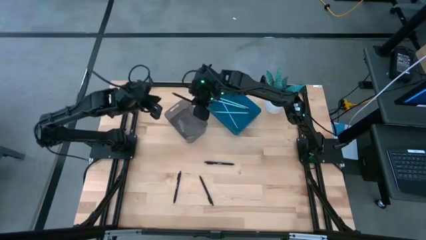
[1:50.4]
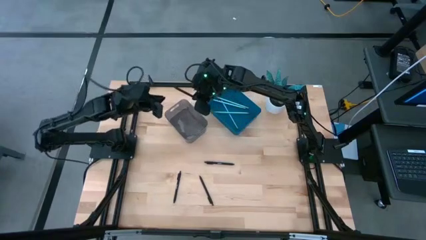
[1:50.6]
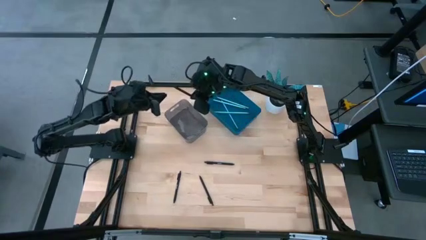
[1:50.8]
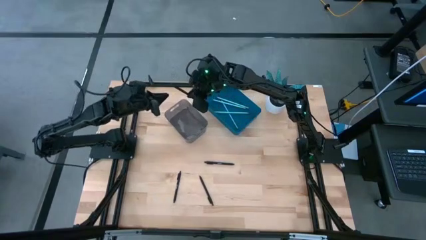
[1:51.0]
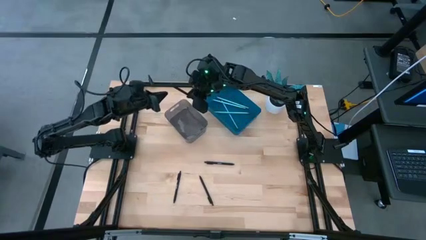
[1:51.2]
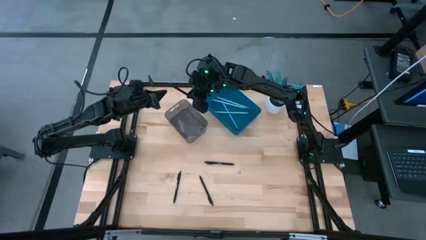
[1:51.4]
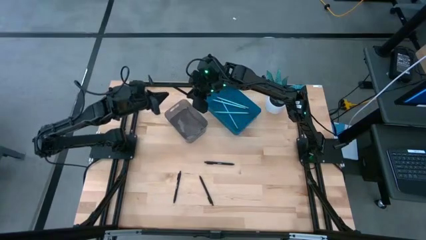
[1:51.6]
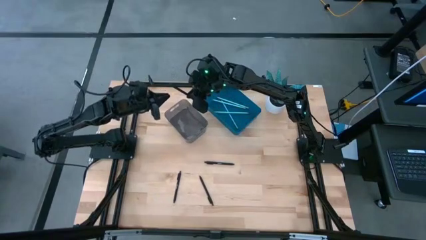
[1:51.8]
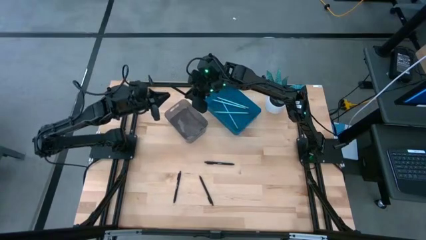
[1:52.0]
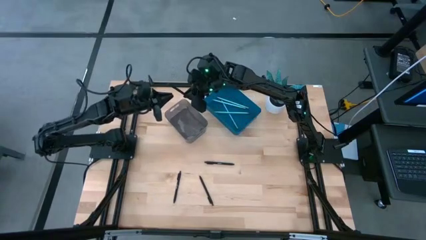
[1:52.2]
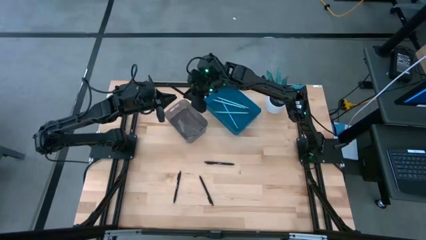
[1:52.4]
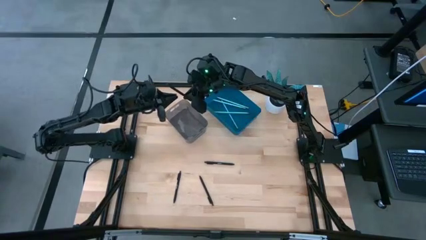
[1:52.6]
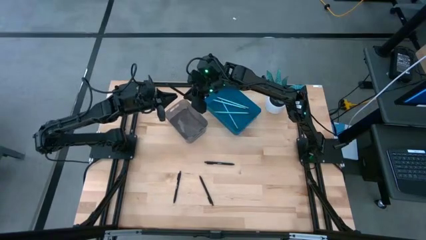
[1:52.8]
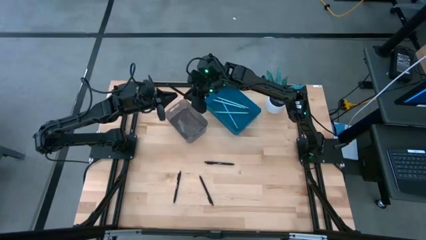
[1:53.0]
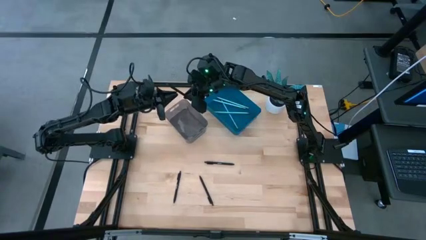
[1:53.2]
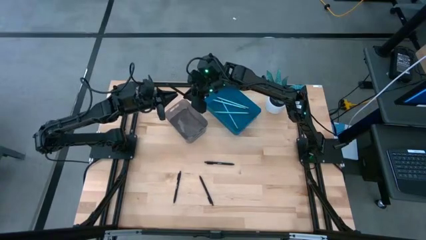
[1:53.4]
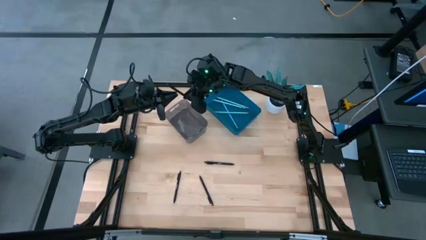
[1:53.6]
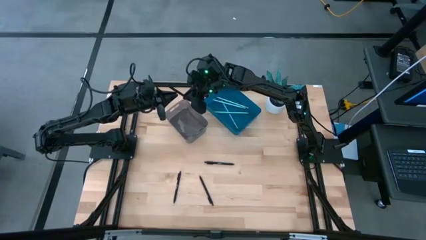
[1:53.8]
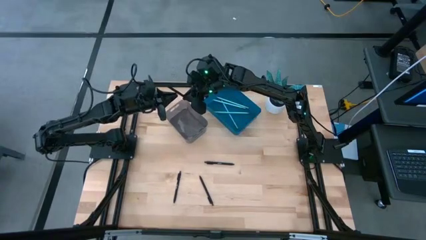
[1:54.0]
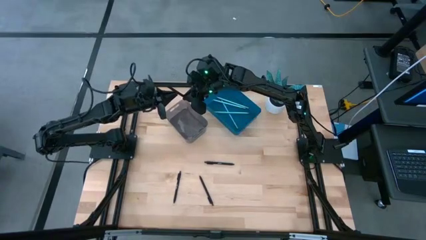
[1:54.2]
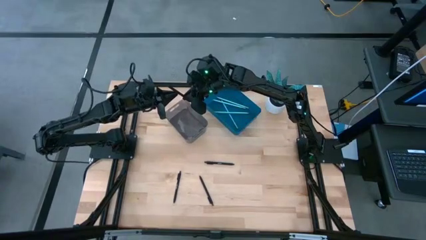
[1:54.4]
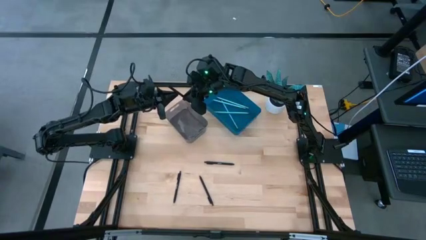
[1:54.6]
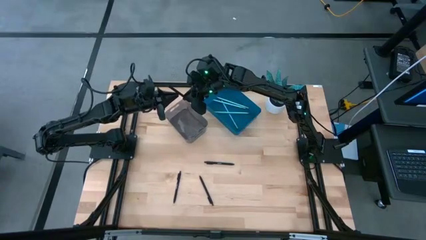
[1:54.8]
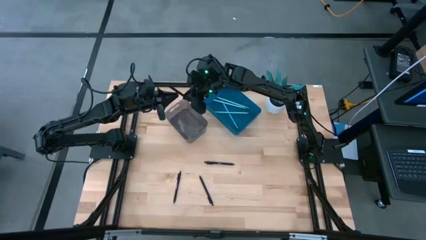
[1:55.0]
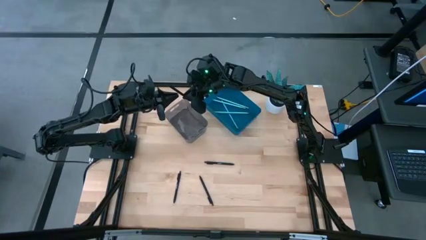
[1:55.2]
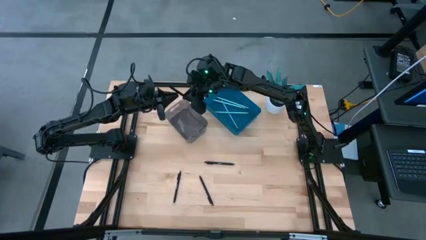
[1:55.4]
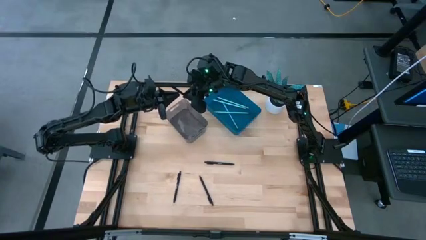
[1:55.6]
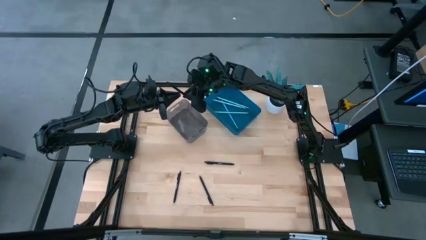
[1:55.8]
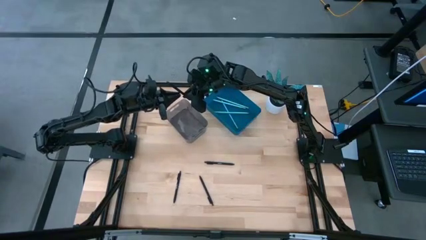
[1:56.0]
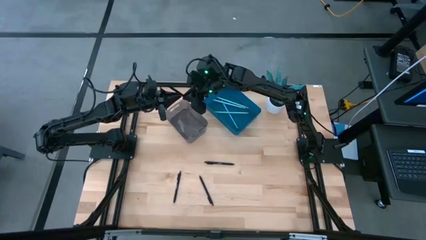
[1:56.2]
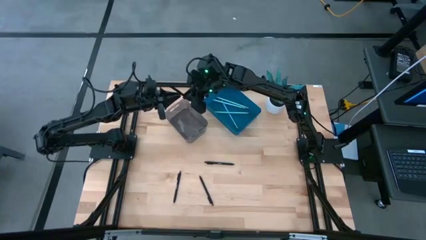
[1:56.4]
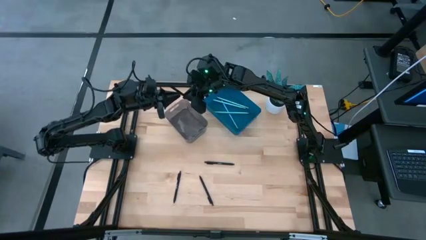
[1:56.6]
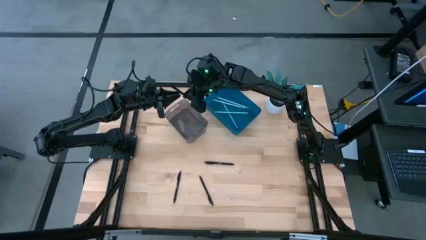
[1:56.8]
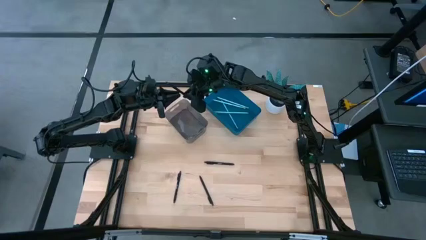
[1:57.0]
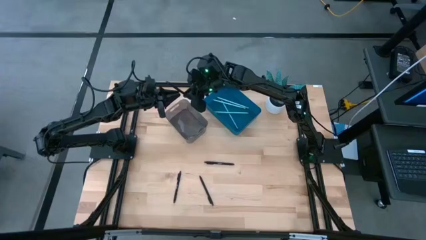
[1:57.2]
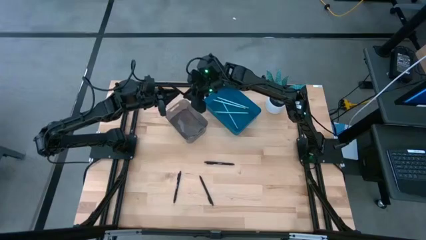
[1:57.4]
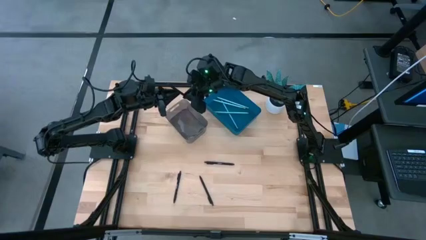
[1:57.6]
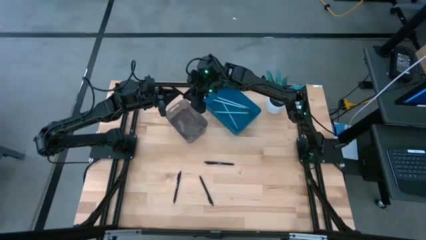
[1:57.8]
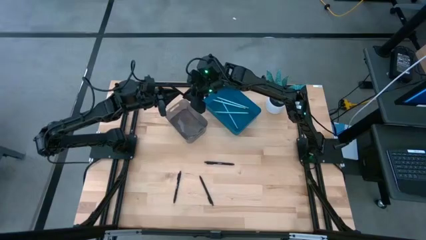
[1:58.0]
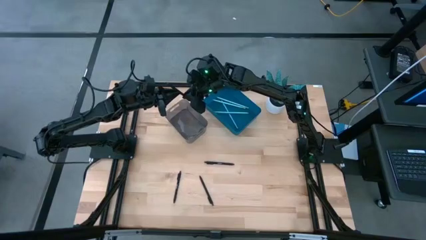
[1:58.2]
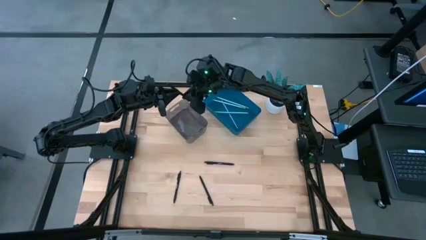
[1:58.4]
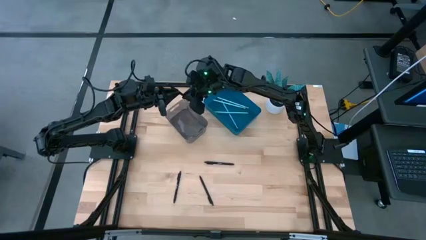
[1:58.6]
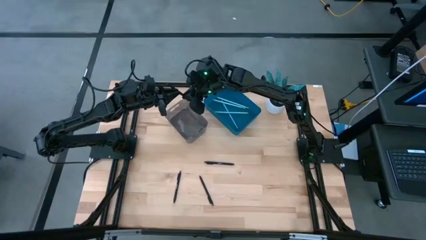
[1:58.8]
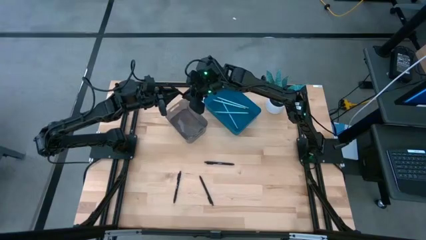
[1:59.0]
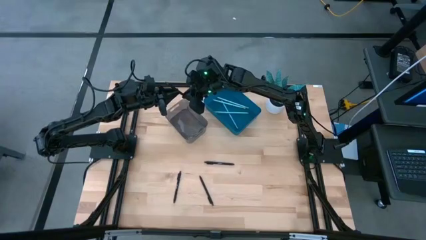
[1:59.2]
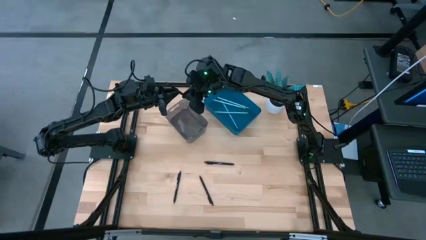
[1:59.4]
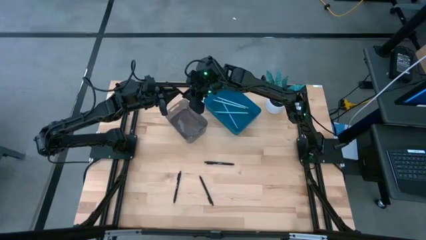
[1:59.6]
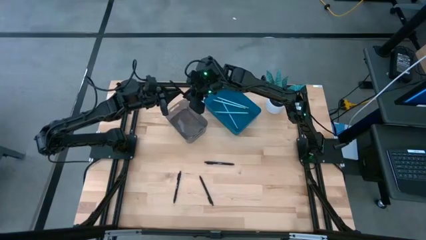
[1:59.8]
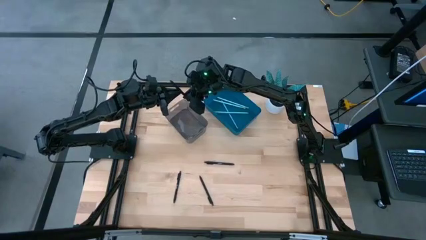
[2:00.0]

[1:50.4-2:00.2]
Task: Sort pens & pencils
Put the black pen into the black bin

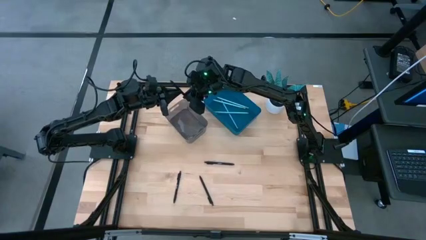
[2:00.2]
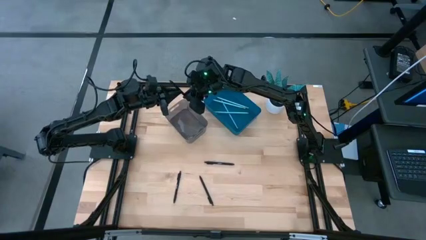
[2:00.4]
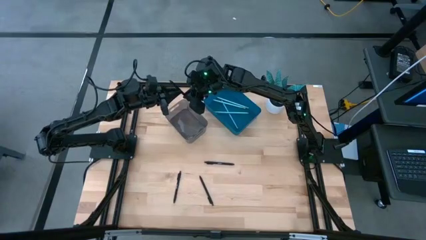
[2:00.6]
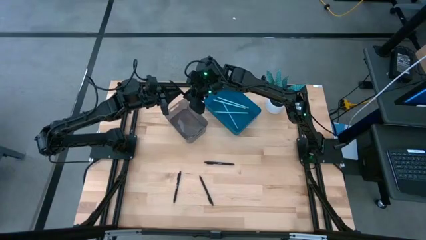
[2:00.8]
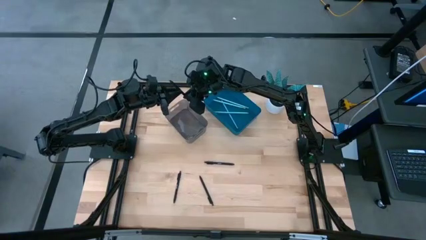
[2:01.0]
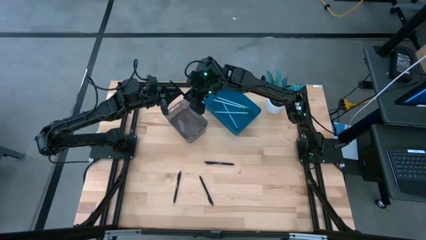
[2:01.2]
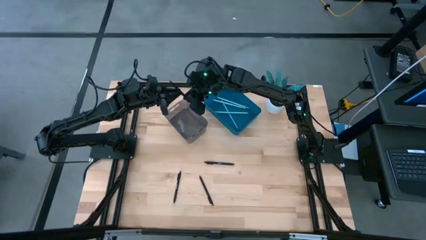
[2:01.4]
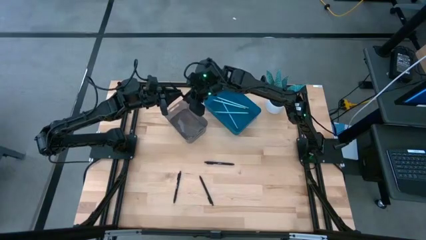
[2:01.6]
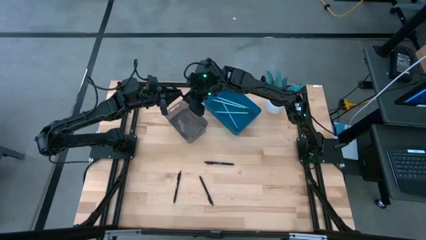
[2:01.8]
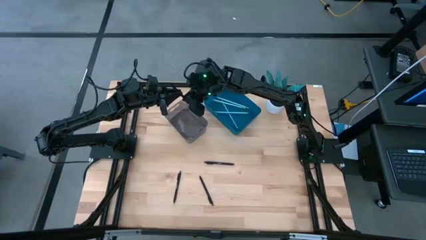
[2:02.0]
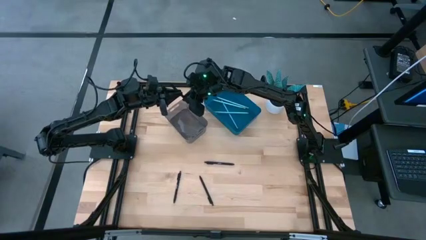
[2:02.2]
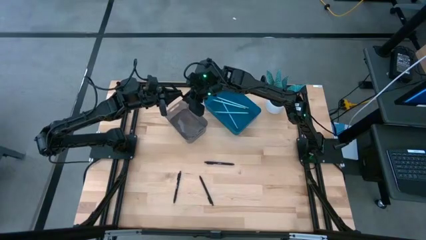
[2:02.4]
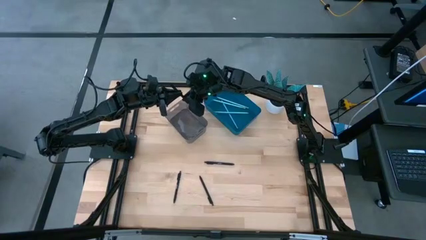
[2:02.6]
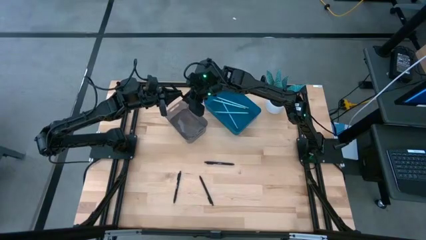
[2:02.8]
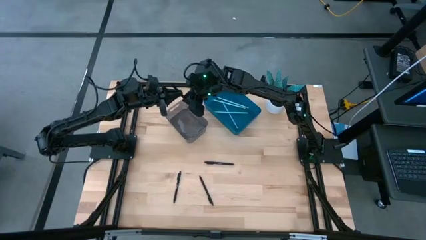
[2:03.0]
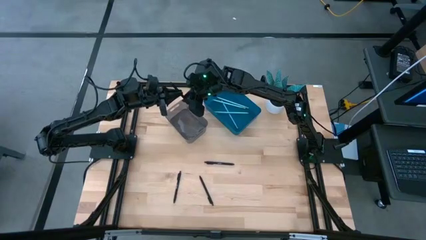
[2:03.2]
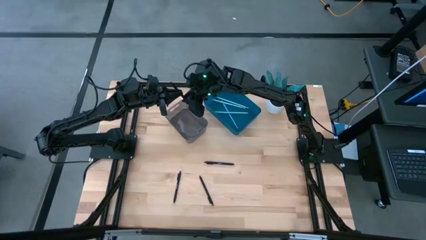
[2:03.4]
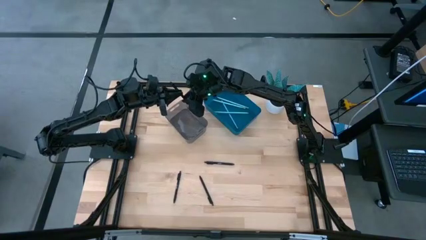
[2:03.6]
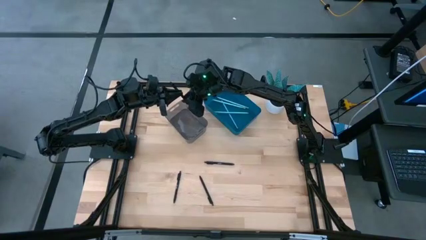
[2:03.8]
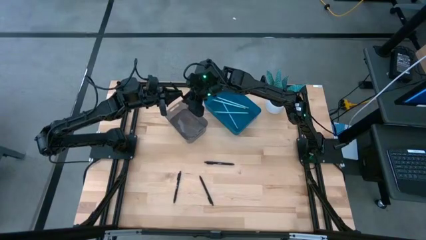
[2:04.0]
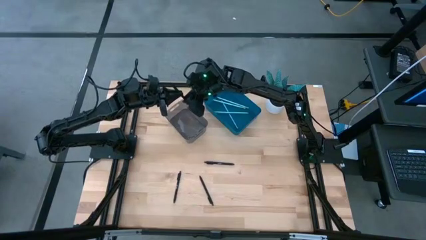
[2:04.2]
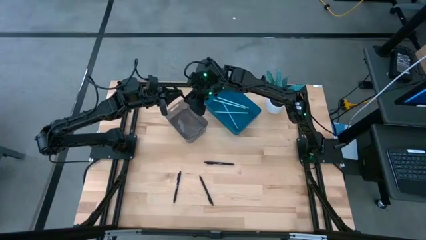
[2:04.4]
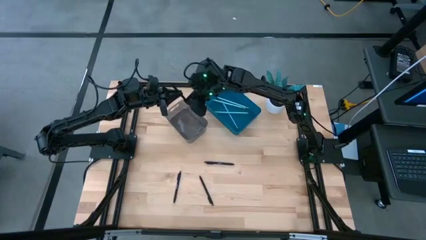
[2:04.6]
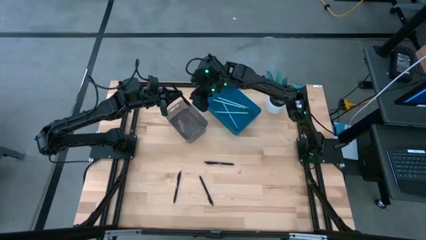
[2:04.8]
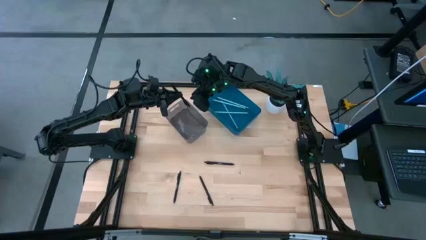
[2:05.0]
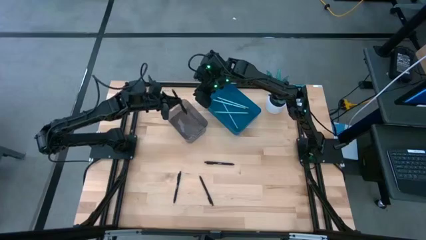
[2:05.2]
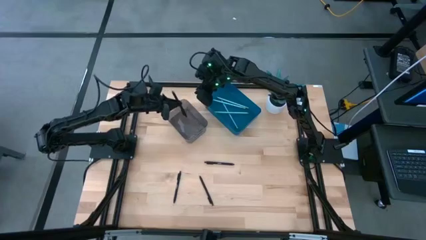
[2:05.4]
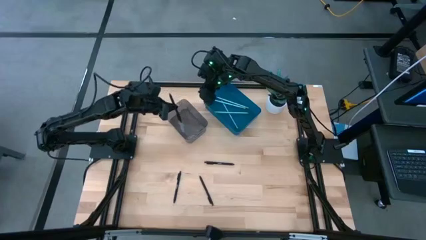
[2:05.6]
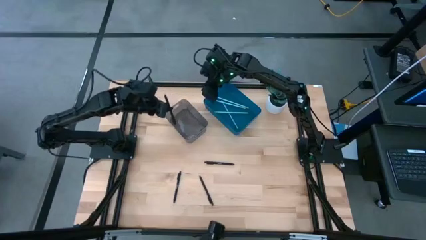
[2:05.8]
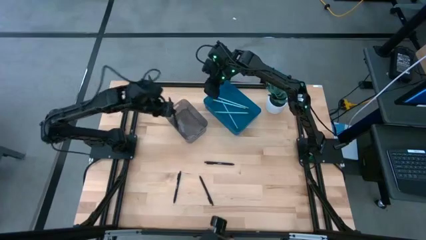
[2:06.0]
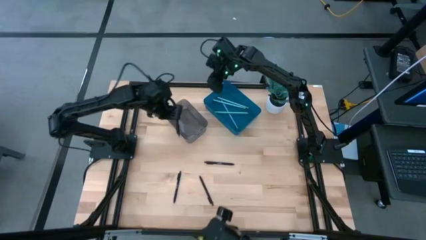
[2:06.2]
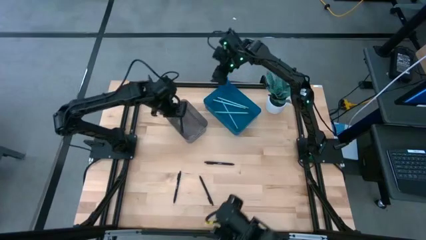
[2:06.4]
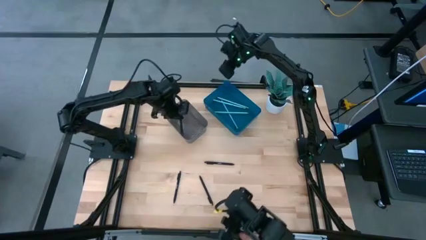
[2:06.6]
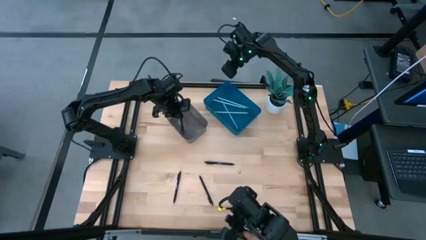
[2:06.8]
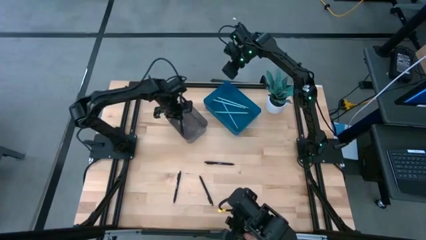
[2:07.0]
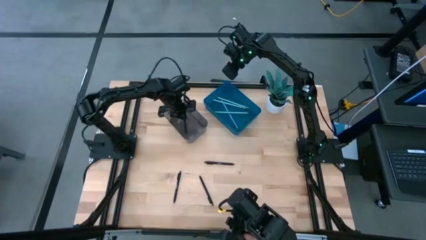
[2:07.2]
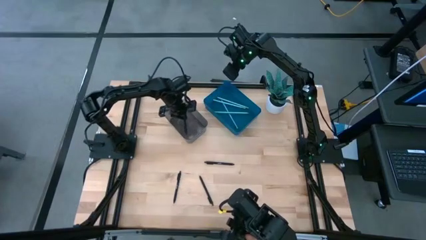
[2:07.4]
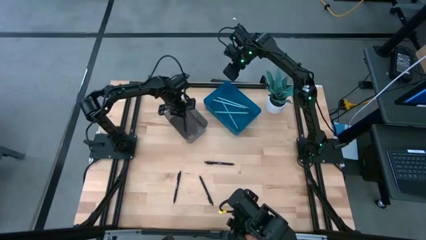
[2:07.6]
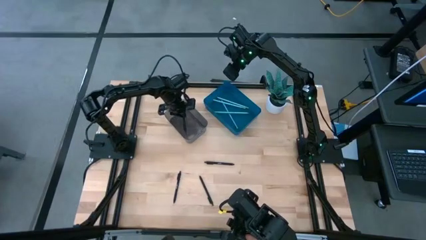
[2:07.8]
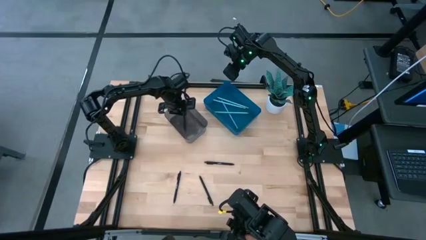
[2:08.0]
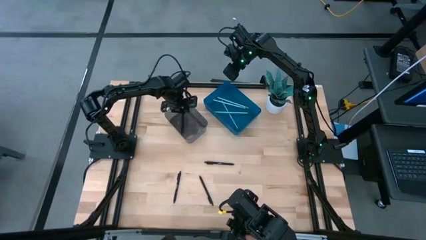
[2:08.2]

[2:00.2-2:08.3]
Put the black pen into the black bin
